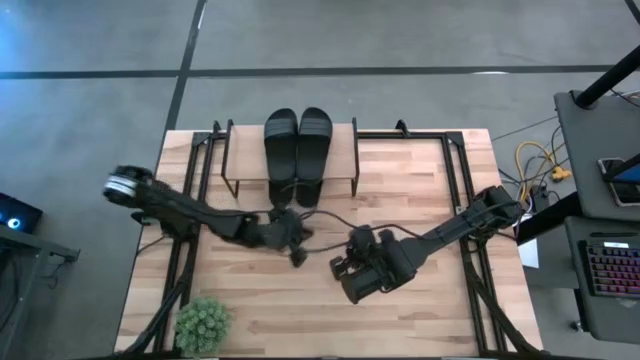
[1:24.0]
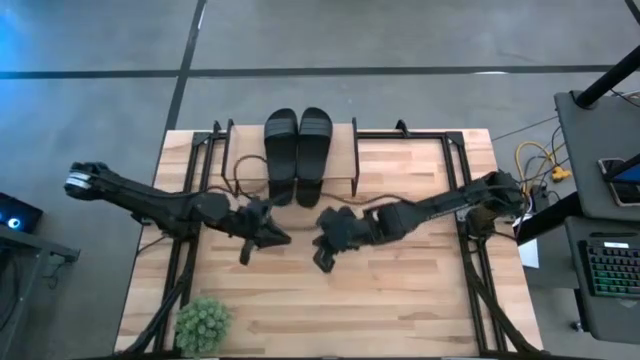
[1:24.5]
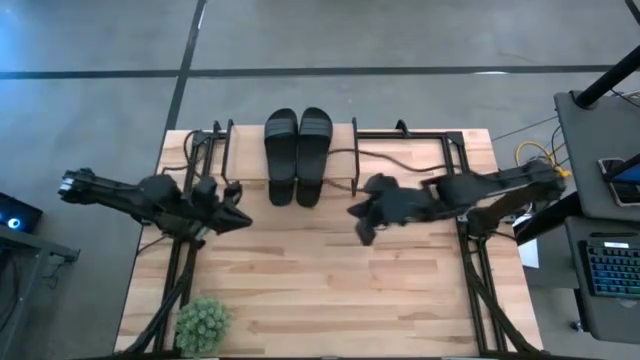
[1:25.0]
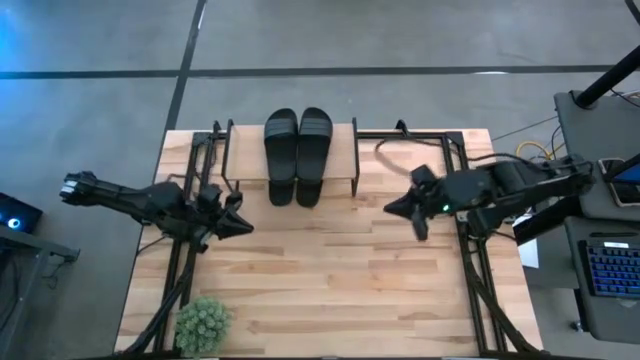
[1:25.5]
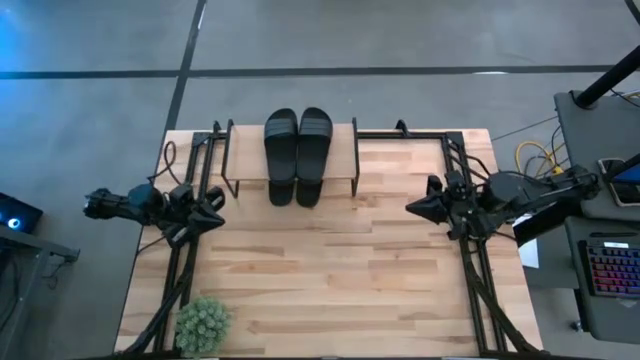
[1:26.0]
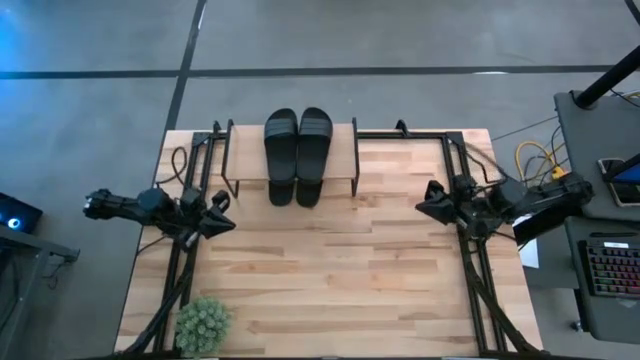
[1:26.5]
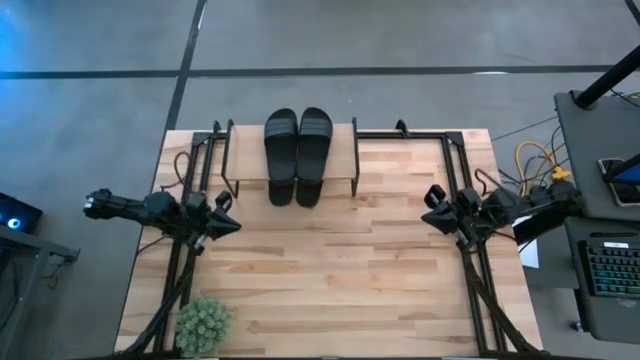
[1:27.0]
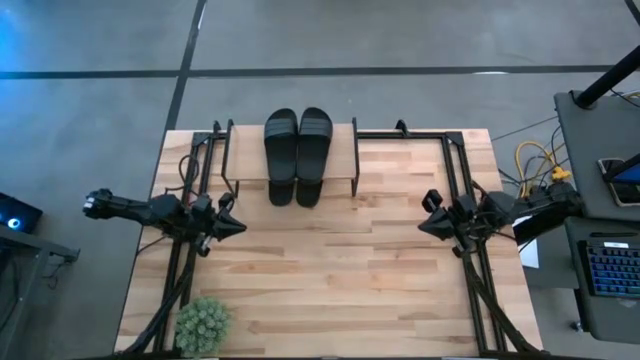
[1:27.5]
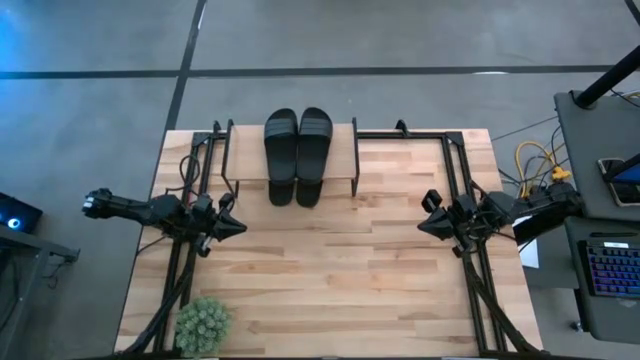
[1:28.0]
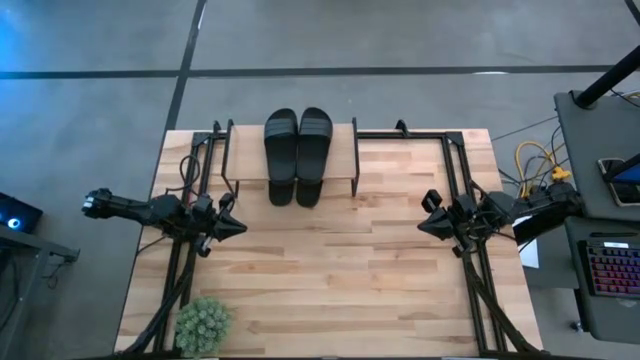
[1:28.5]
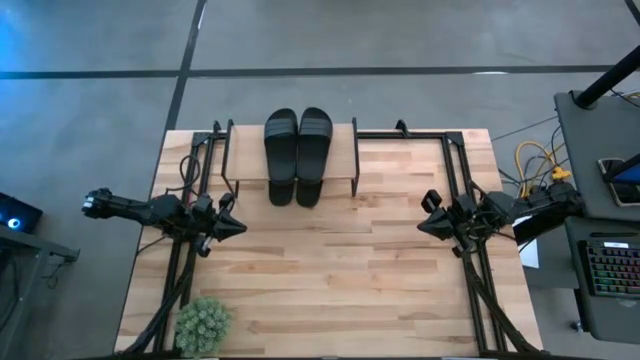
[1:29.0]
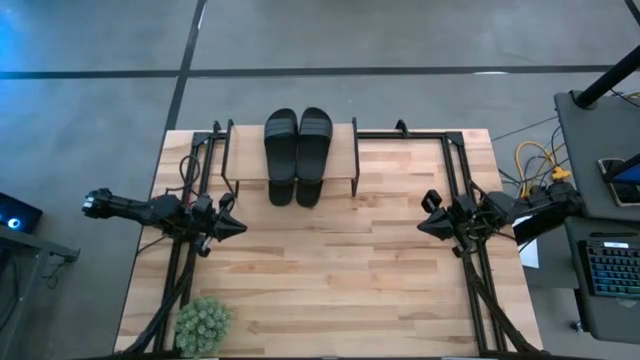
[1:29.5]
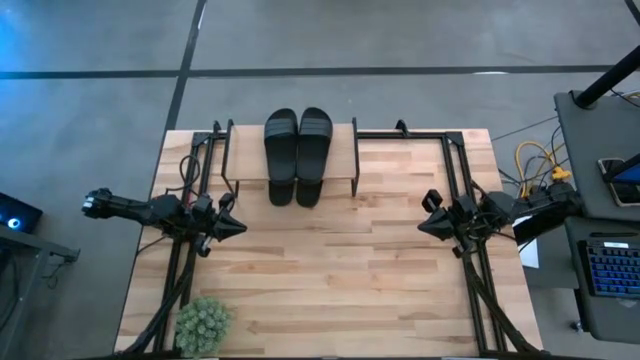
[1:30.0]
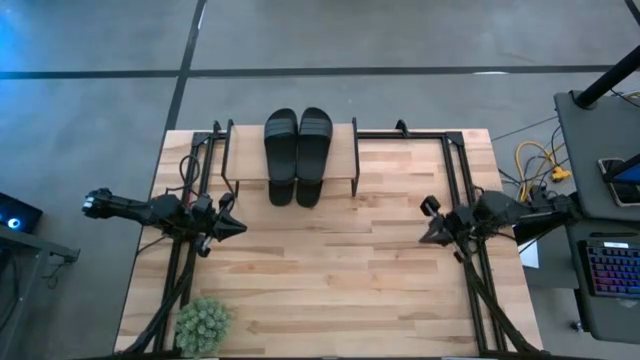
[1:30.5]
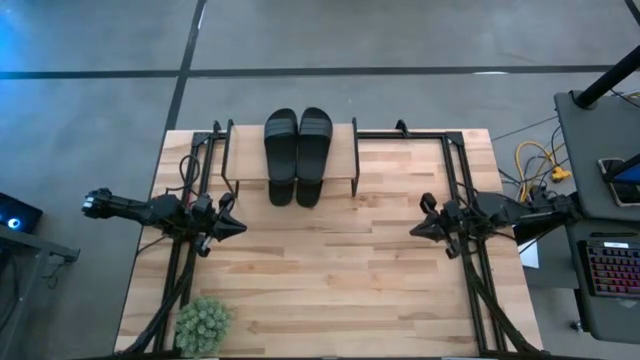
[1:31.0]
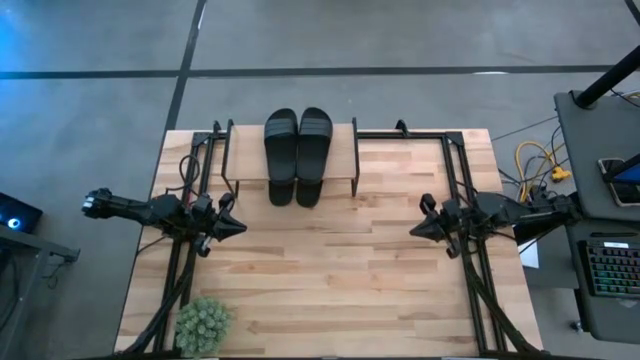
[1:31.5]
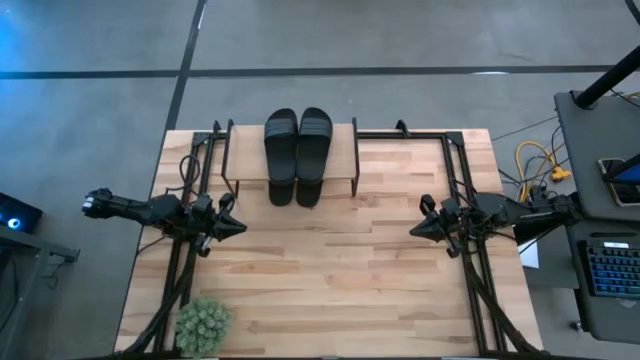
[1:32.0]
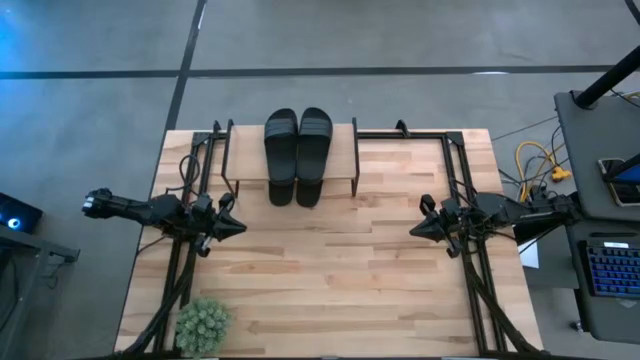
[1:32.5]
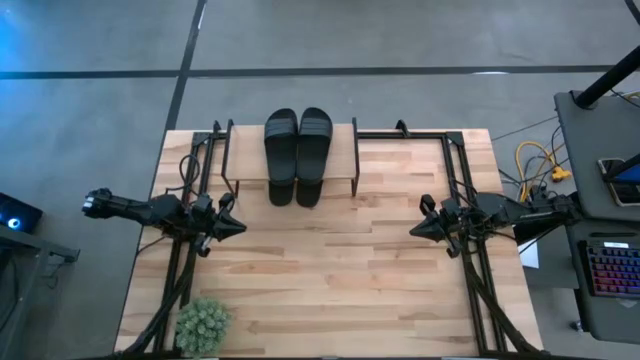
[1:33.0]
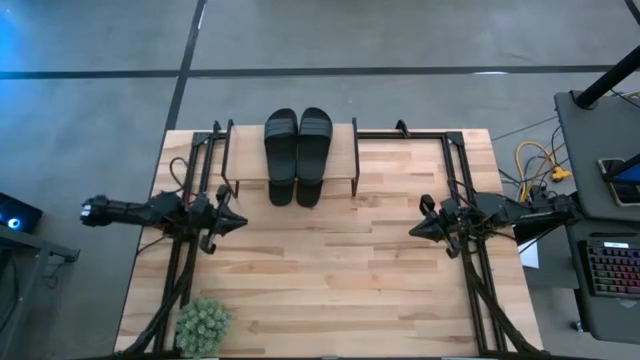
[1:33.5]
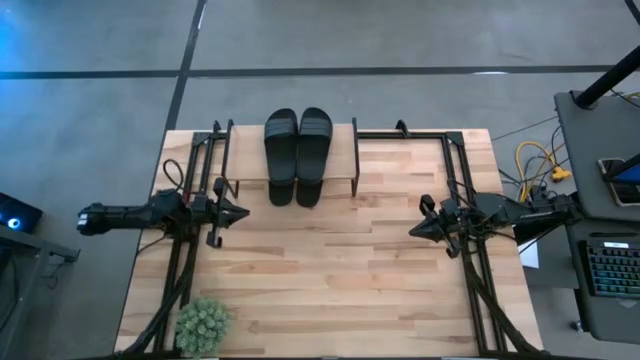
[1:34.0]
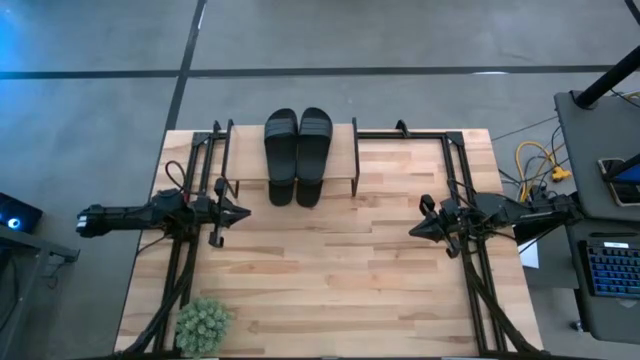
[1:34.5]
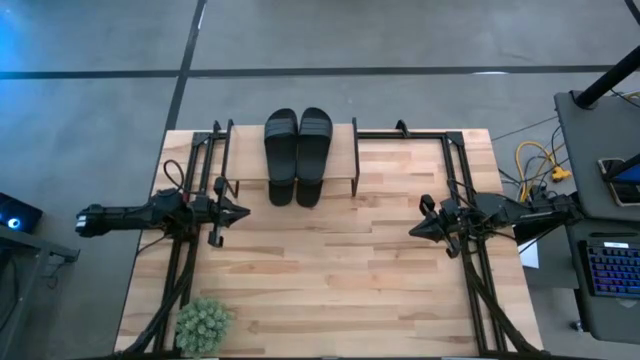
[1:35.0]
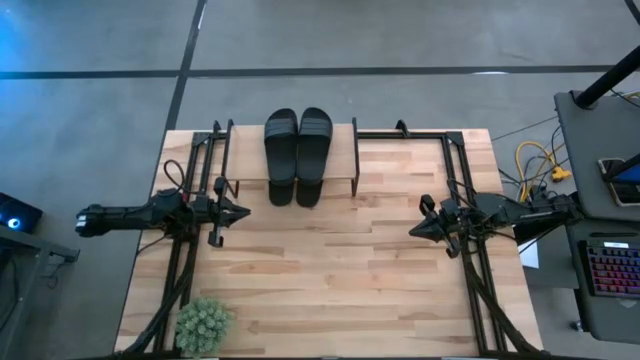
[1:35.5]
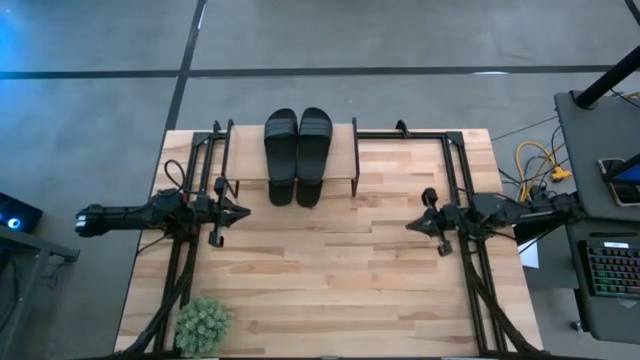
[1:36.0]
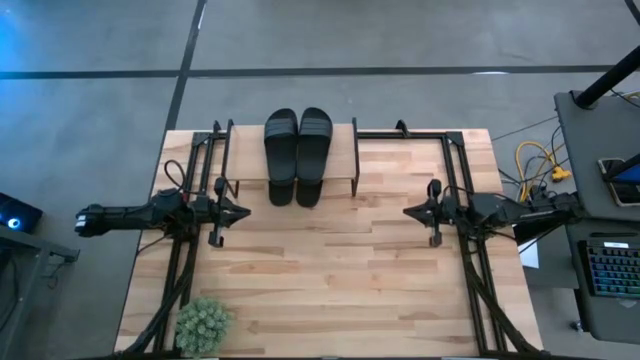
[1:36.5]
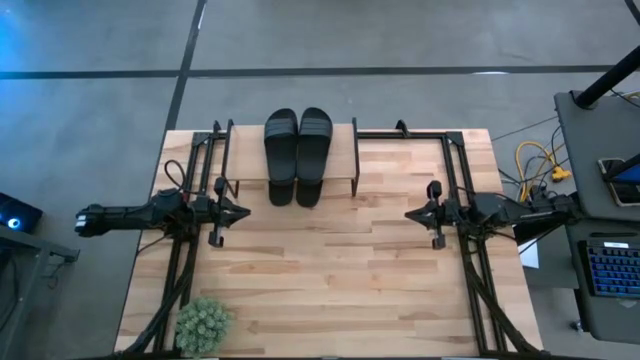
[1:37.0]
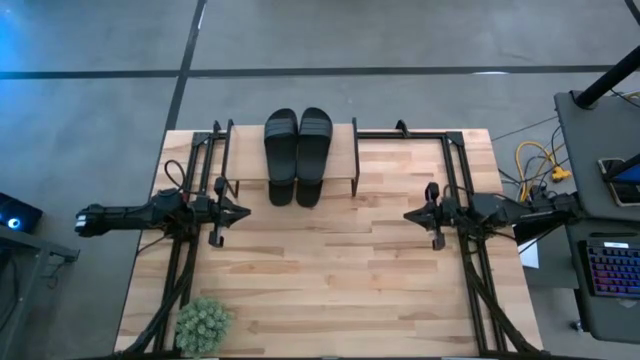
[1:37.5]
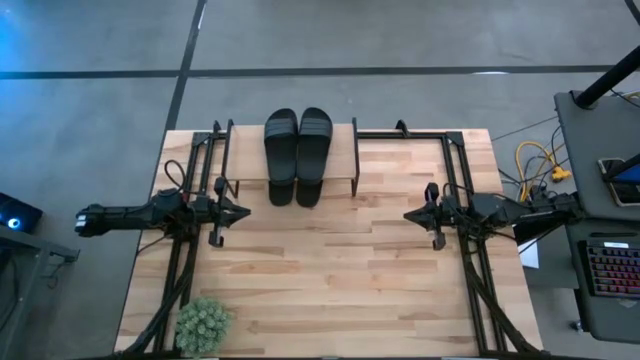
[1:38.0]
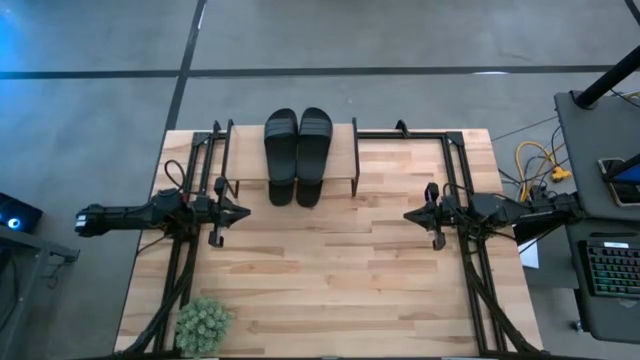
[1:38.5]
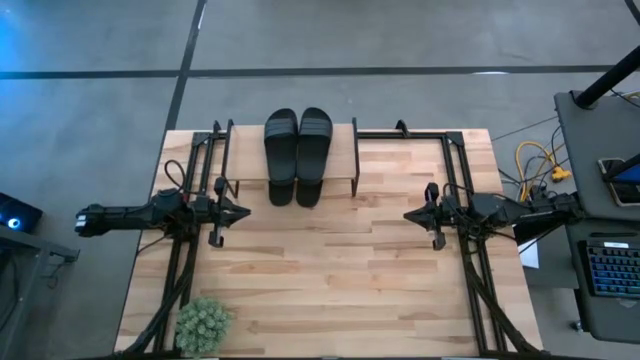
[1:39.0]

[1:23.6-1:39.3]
Task: Pick and place slides into the shelf
Return to Home Position

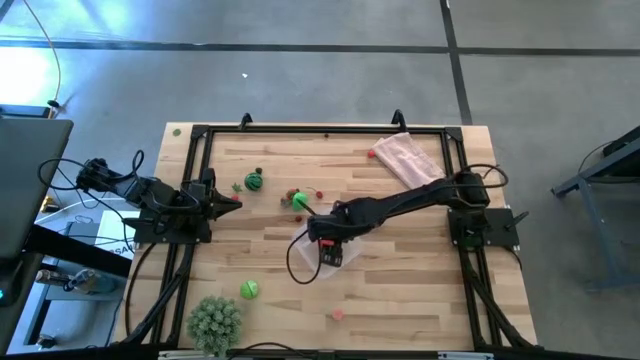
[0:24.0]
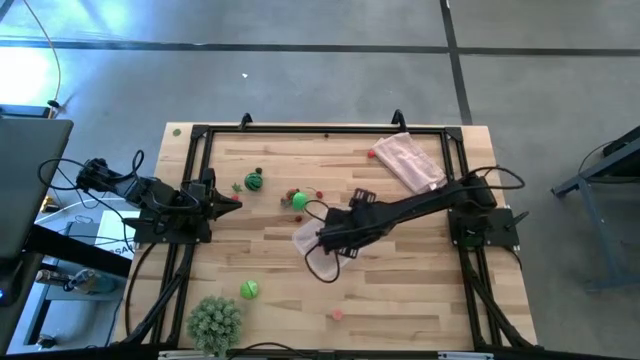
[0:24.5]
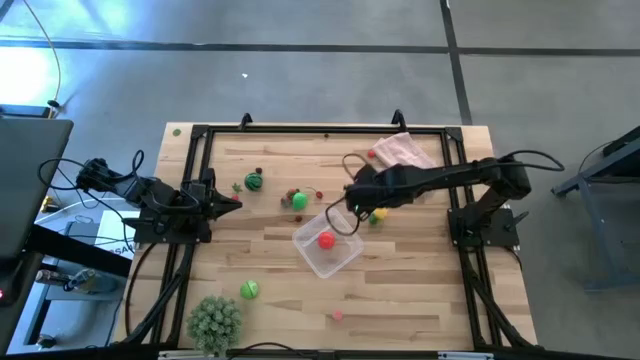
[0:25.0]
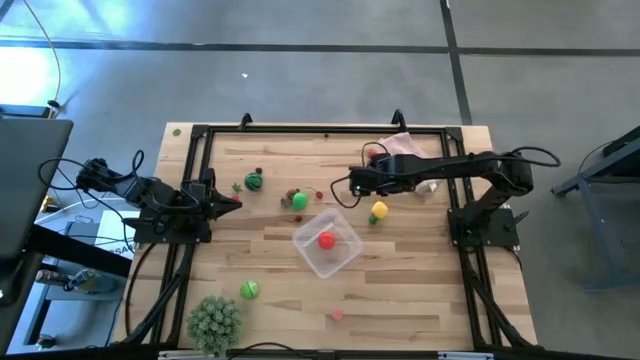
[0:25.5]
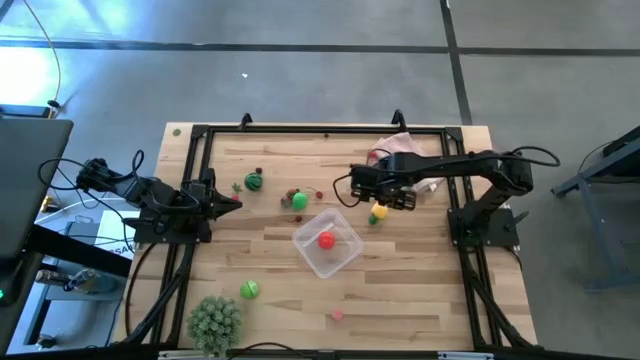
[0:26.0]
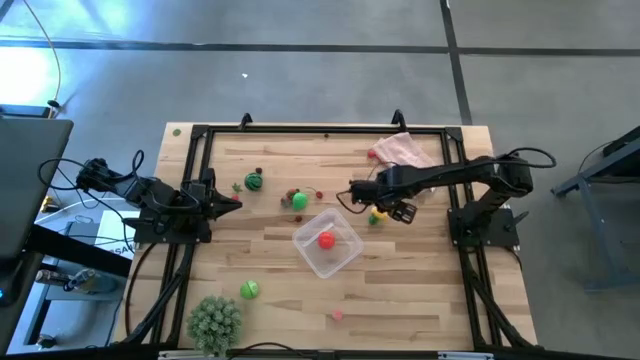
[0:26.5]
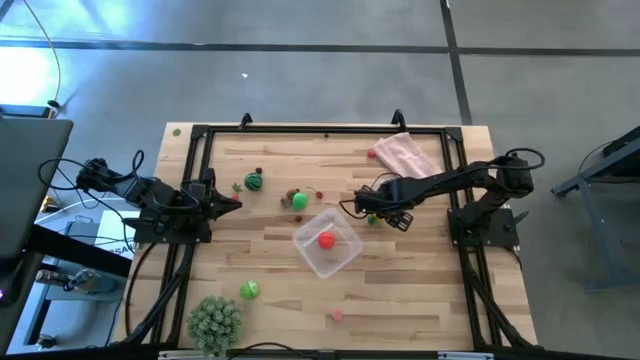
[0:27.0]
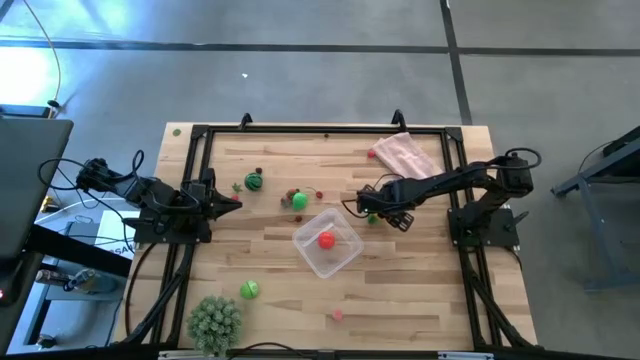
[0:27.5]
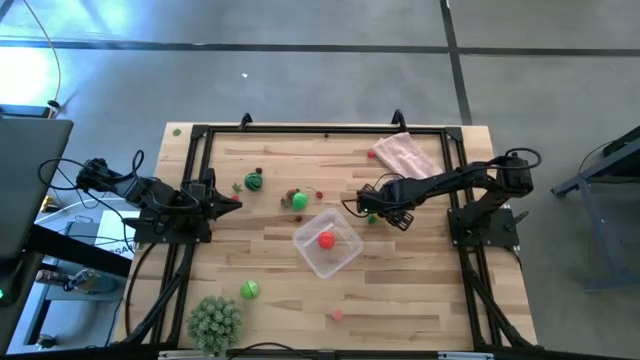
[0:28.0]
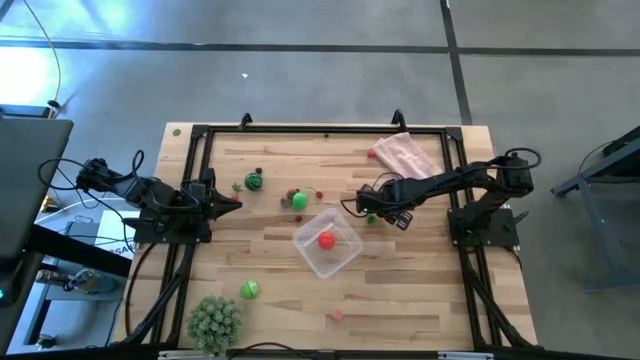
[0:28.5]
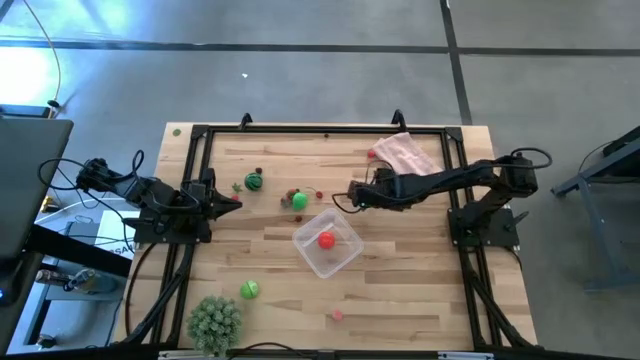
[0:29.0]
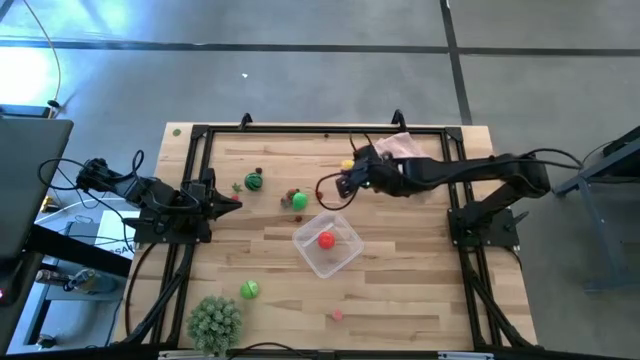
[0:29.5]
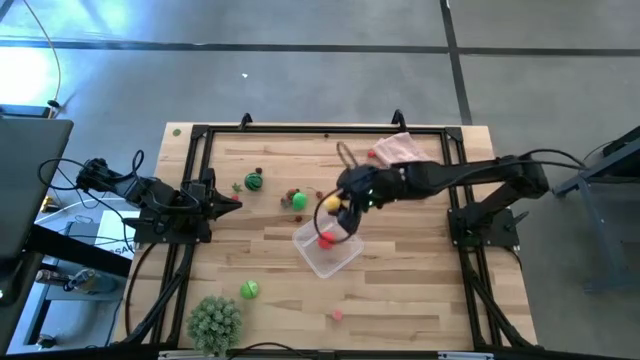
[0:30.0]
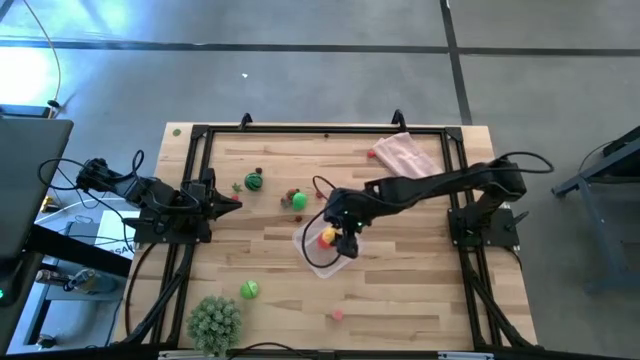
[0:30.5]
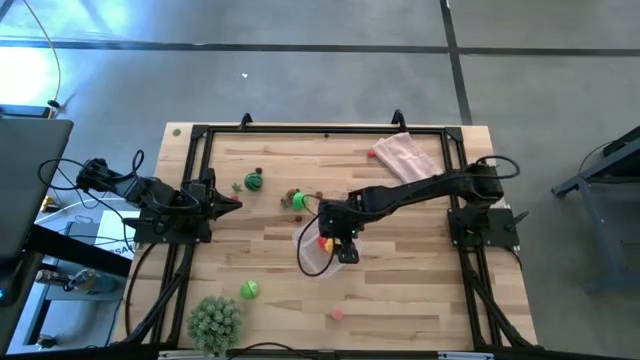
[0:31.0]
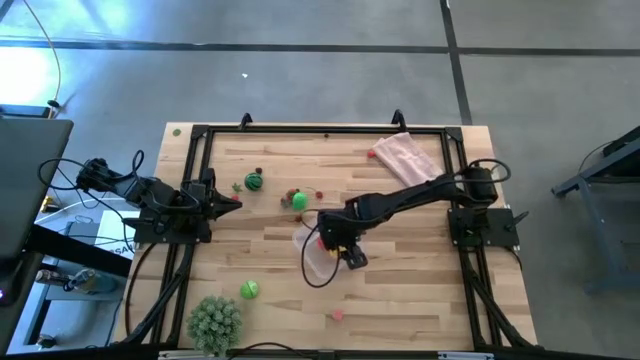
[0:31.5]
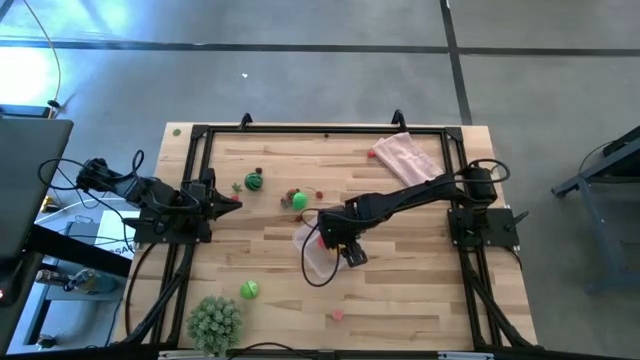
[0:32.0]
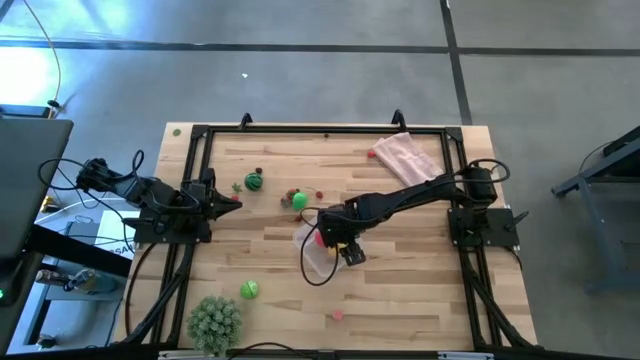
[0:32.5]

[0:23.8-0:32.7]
Task: Pick and placing Produce into tupperware
Put the yellow pineapple into the transparent container
